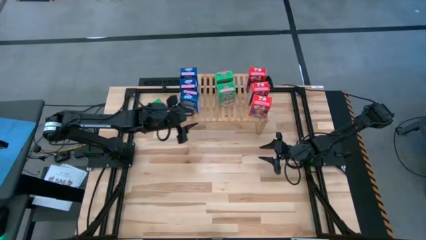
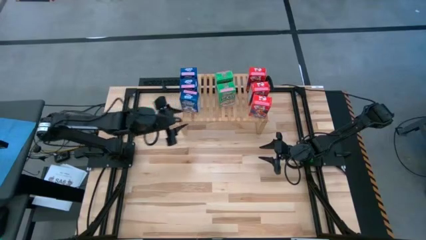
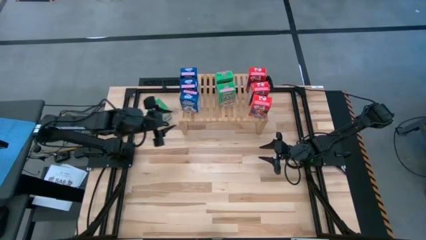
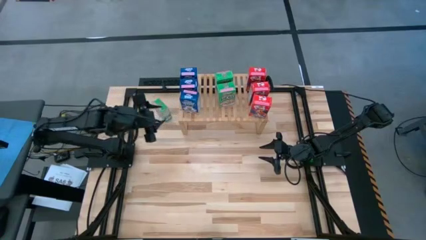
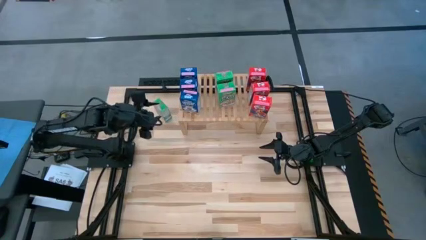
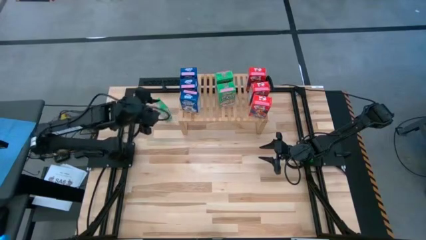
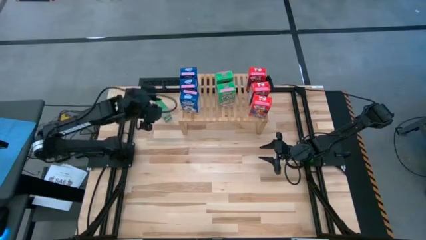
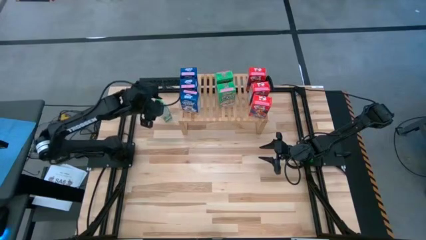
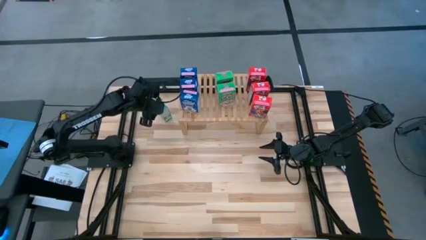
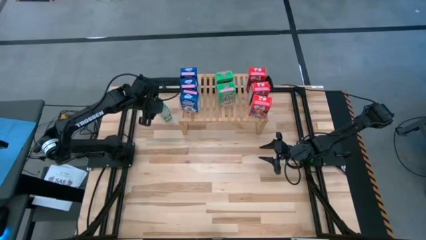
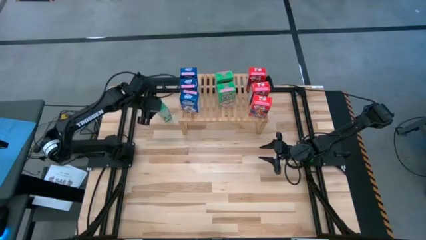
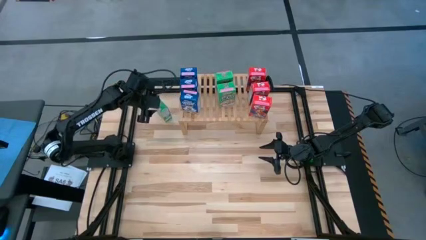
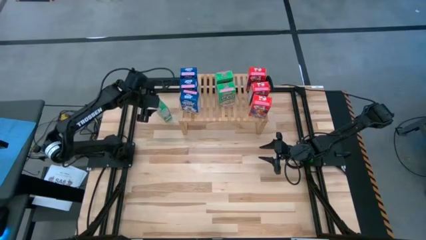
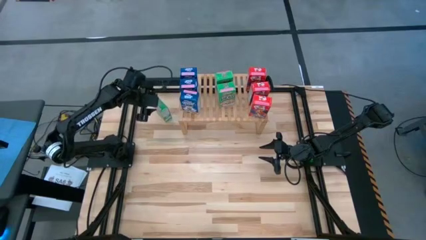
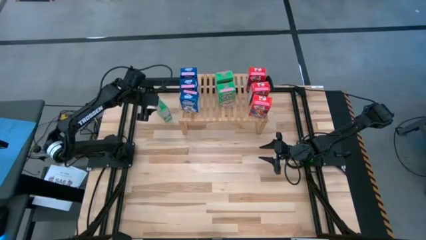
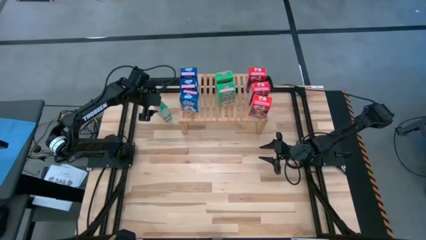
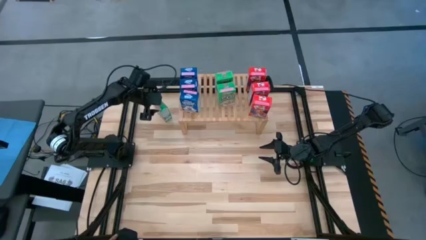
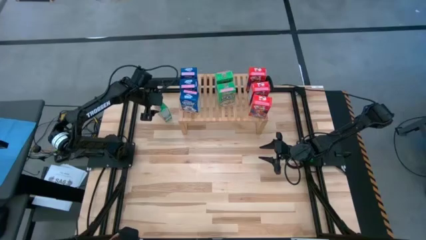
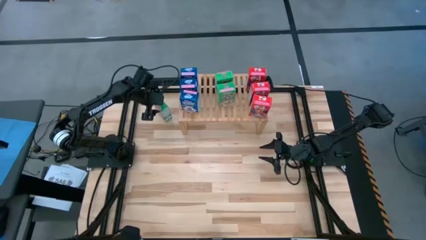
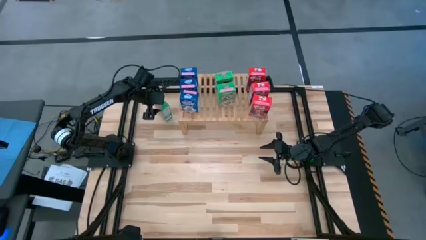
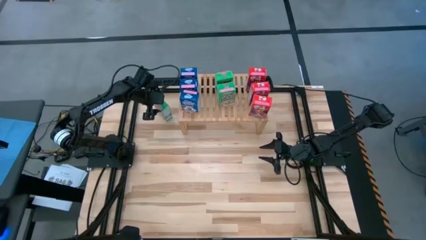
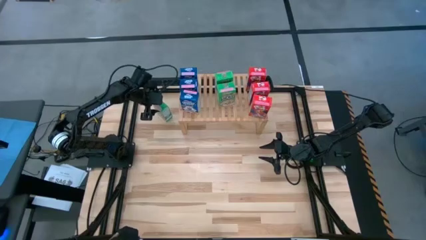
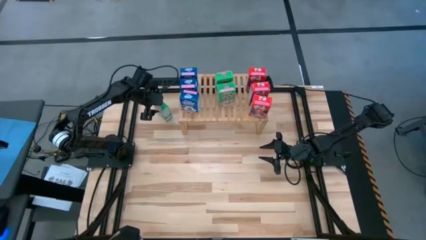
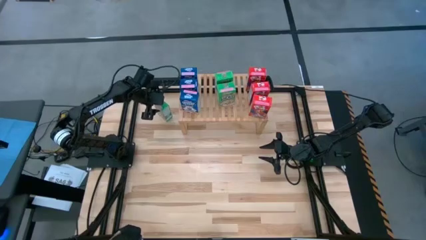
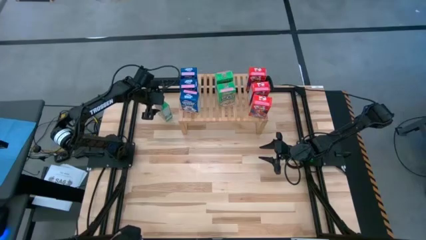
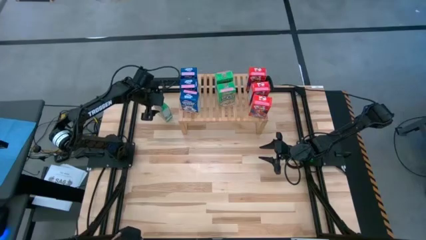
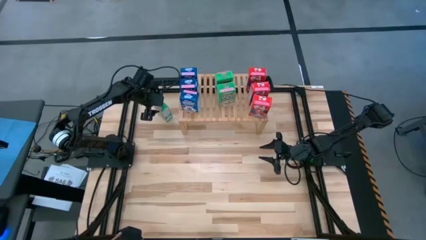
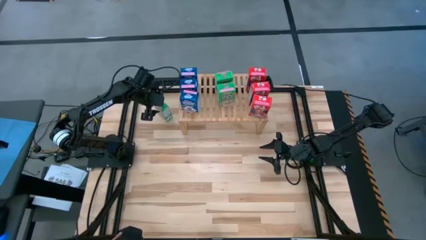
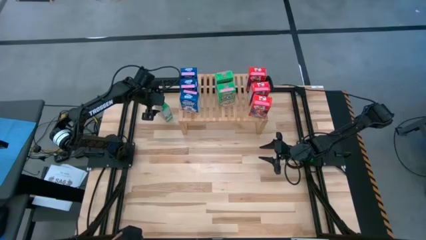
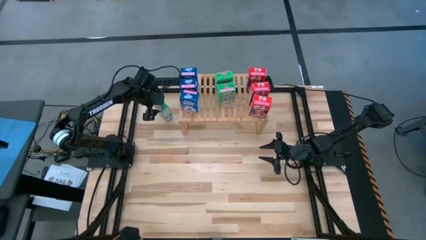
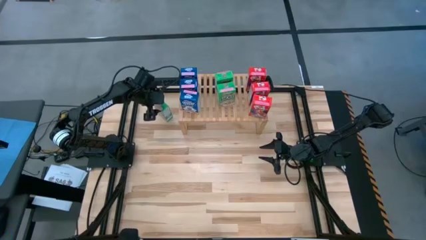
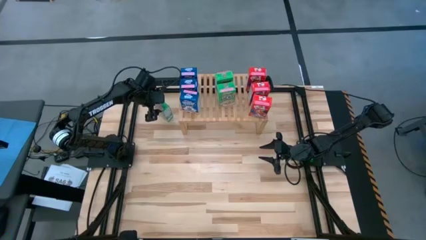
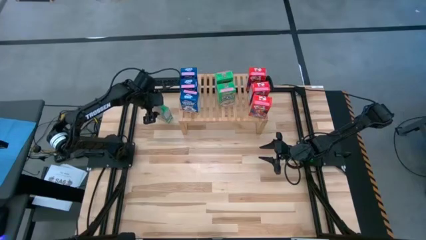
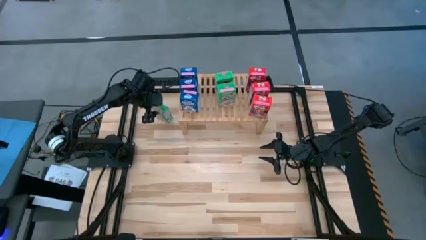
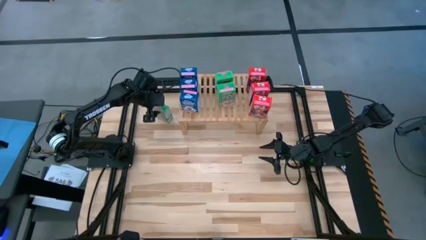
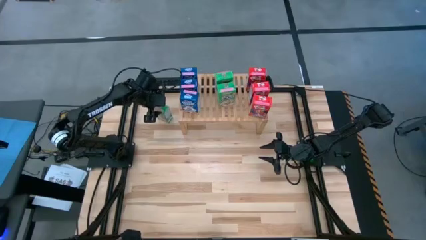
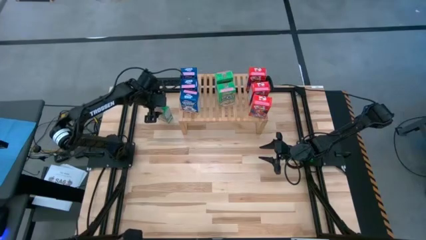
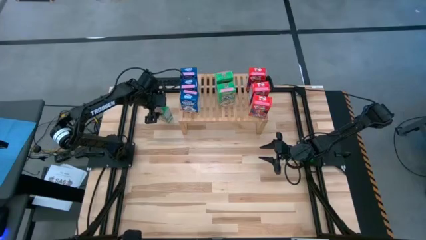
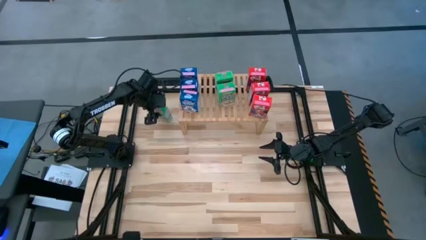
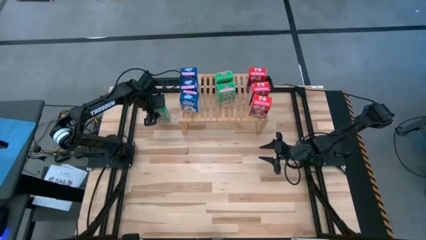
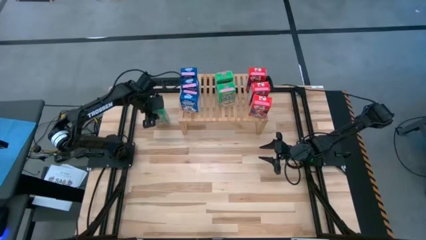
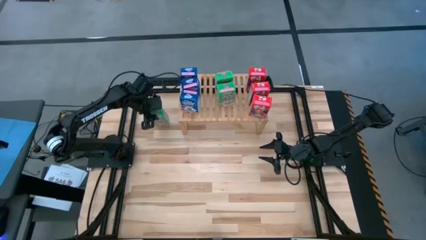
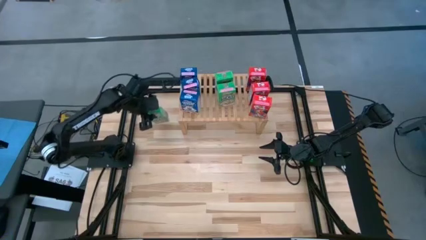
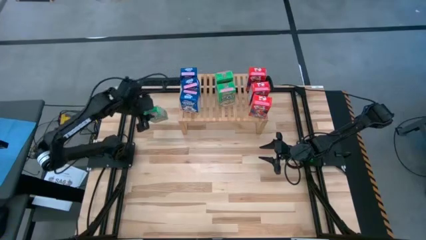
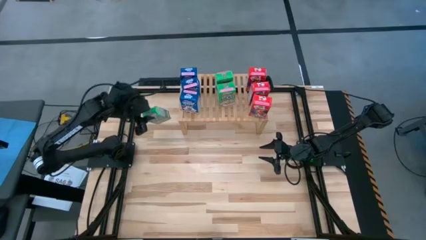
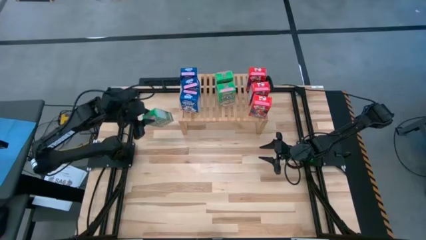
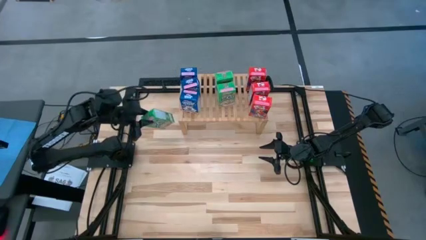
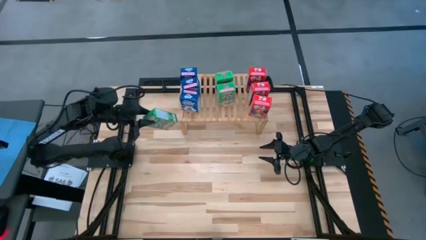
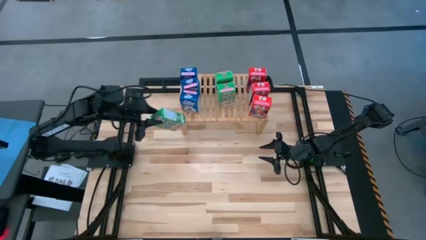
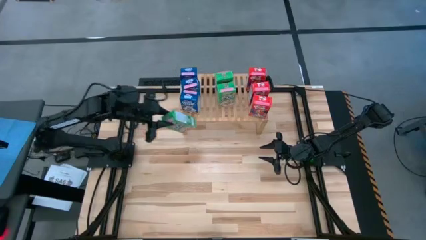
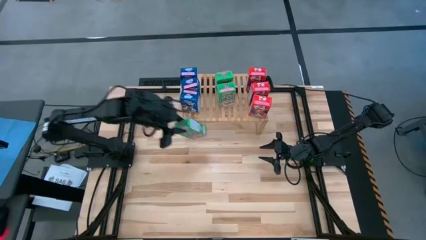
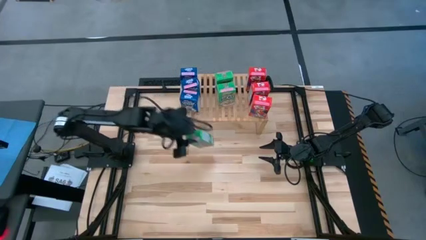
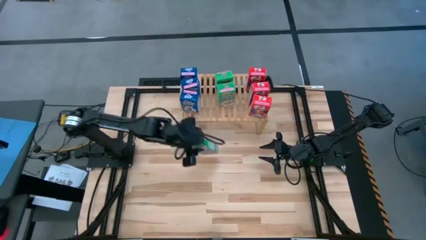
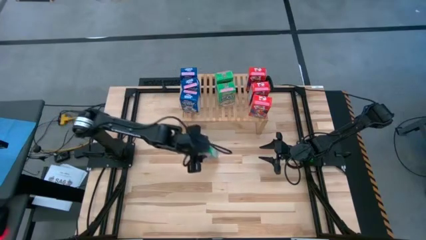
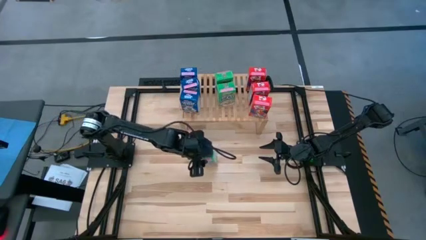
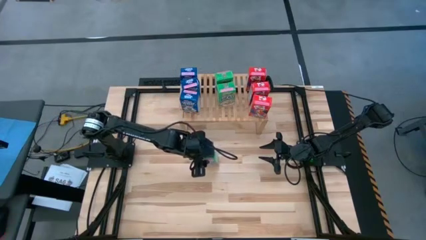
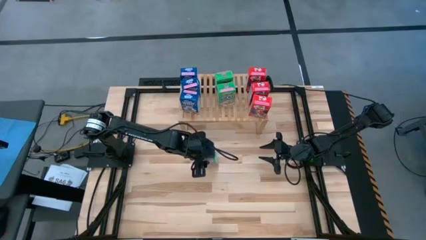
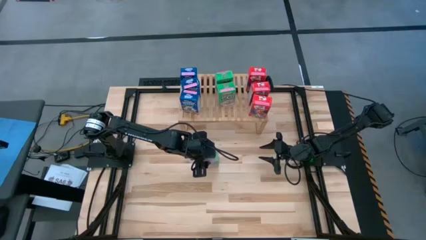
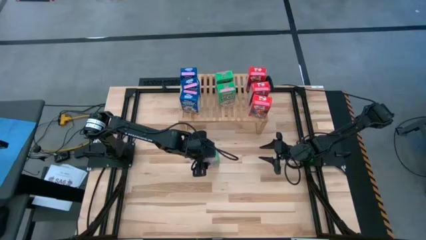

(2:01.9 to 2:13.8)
Task: Stack cereal on shelf
Put the green cereal box on the shelf aligned with the other green cereal box
